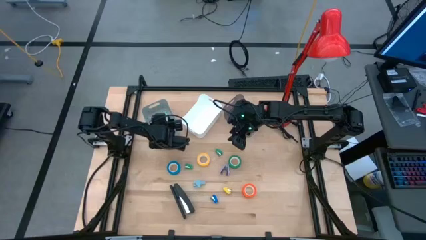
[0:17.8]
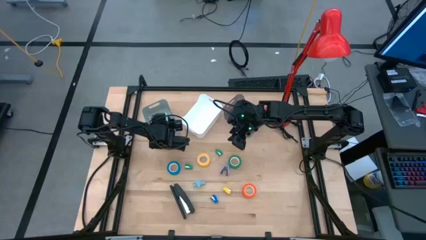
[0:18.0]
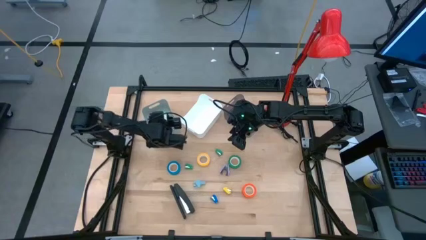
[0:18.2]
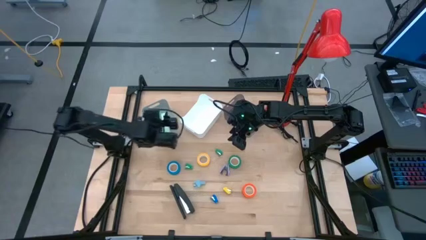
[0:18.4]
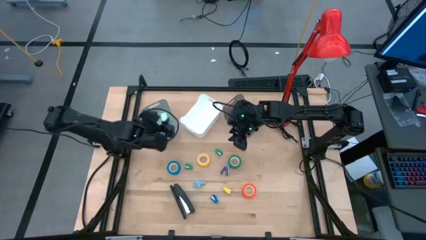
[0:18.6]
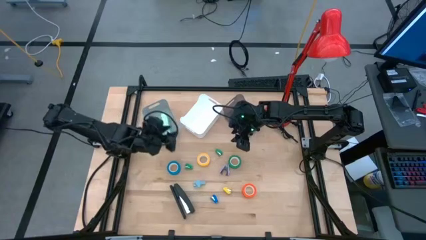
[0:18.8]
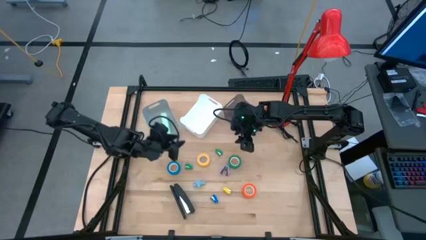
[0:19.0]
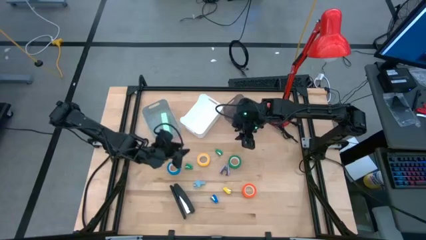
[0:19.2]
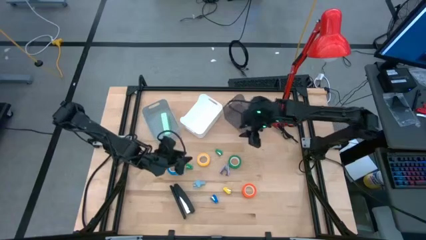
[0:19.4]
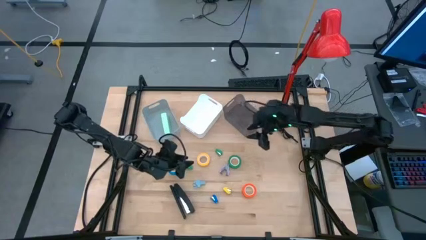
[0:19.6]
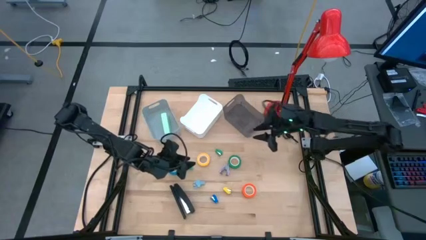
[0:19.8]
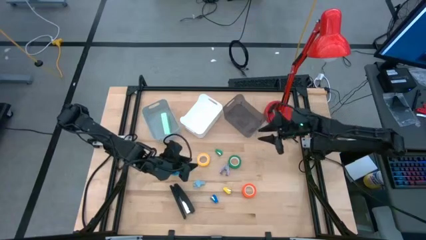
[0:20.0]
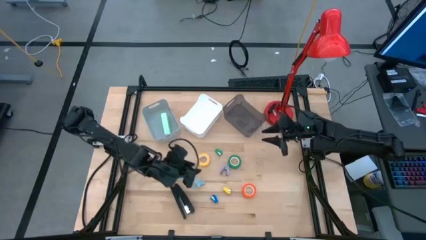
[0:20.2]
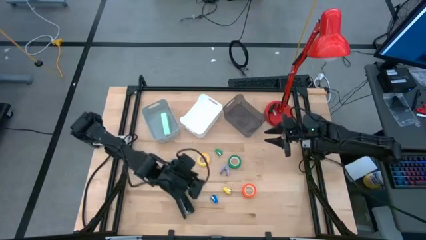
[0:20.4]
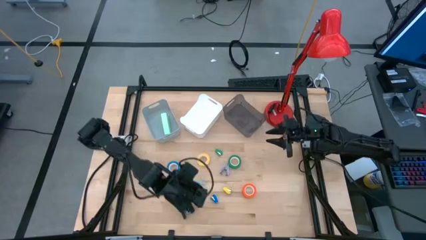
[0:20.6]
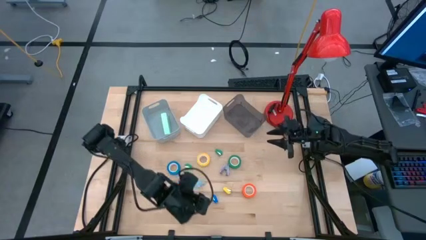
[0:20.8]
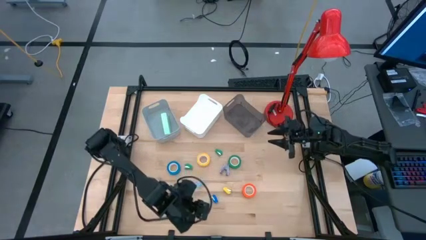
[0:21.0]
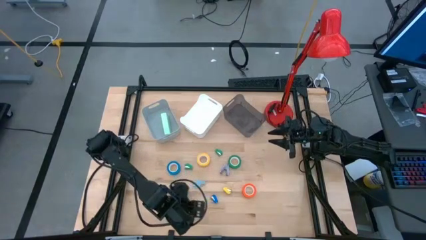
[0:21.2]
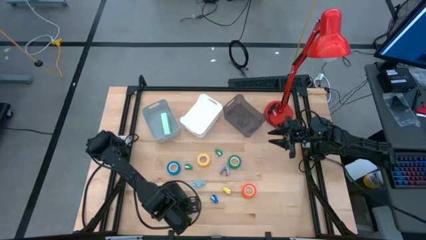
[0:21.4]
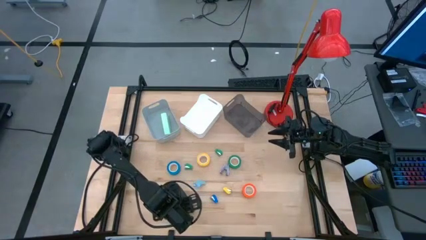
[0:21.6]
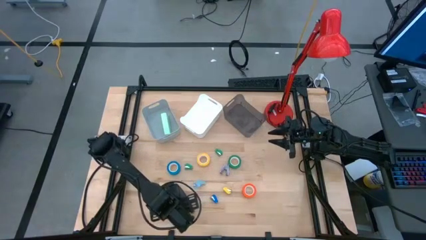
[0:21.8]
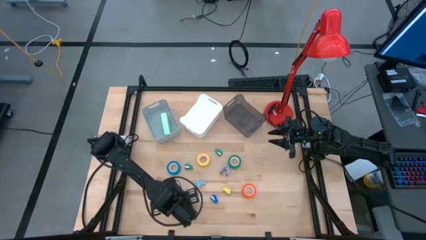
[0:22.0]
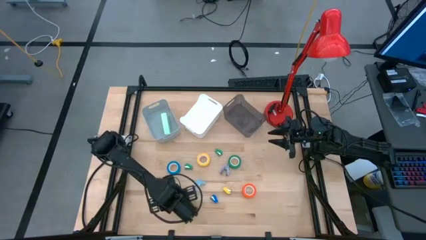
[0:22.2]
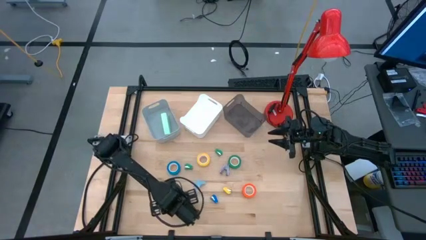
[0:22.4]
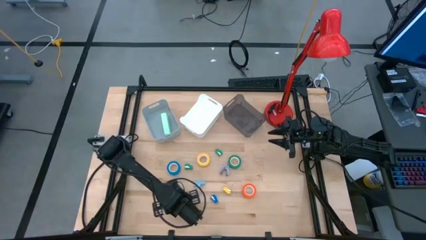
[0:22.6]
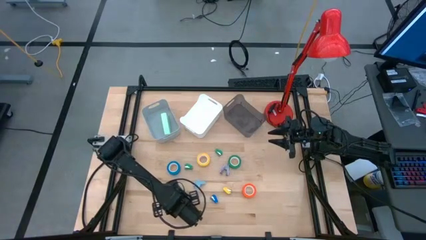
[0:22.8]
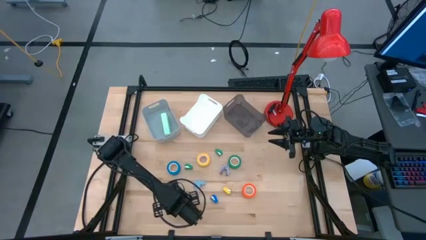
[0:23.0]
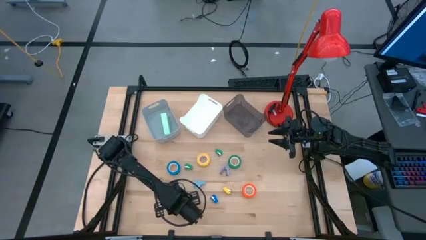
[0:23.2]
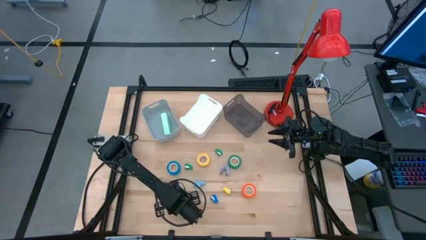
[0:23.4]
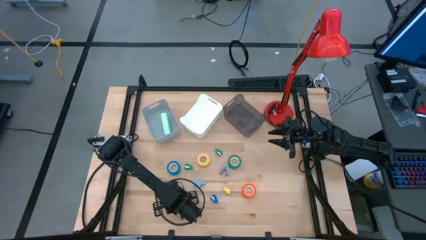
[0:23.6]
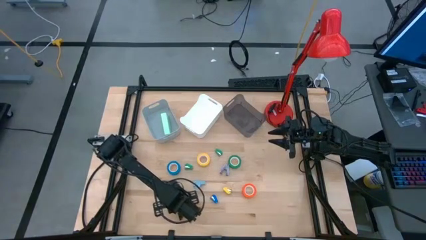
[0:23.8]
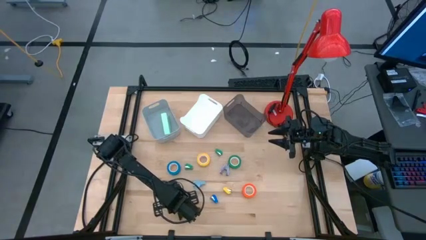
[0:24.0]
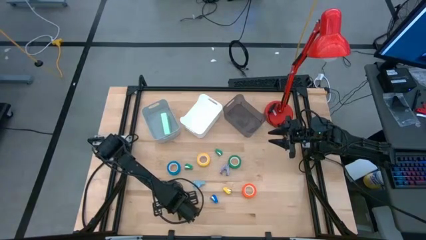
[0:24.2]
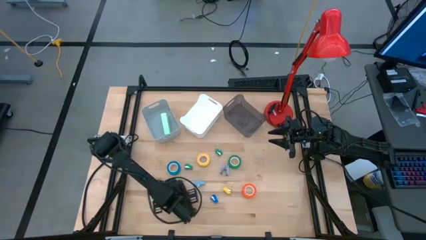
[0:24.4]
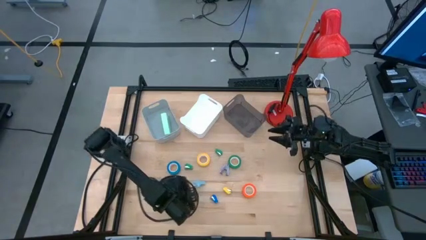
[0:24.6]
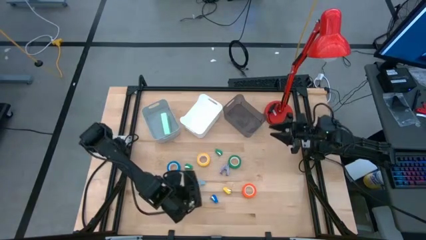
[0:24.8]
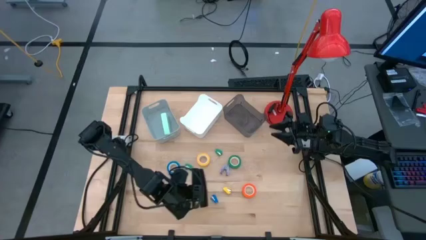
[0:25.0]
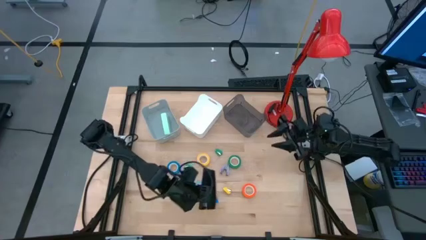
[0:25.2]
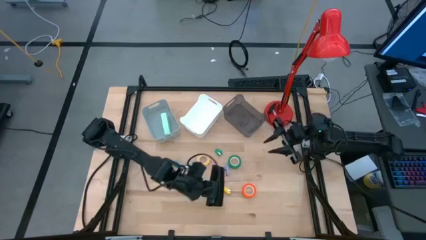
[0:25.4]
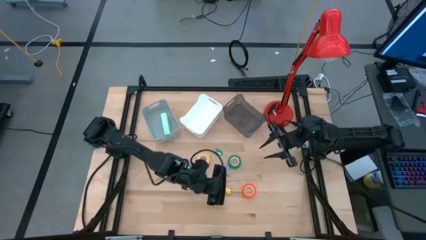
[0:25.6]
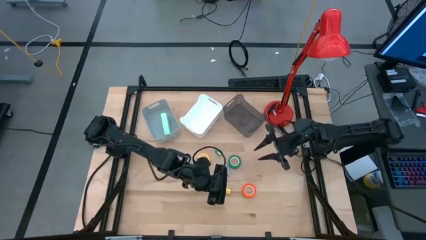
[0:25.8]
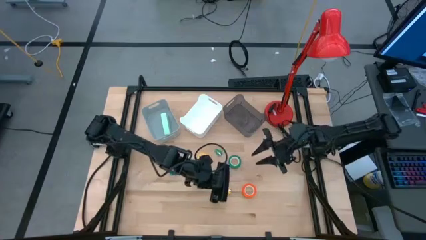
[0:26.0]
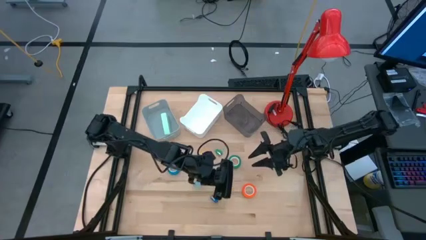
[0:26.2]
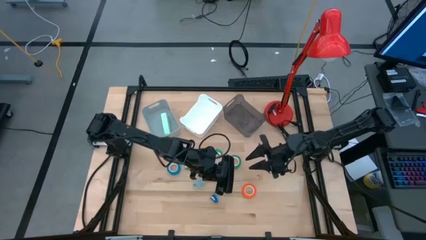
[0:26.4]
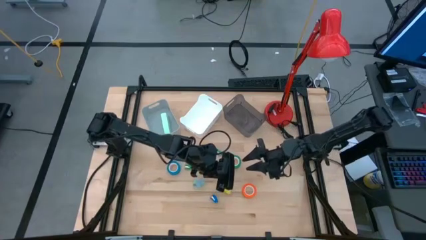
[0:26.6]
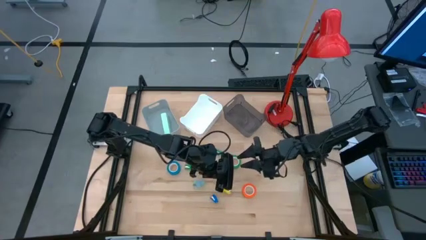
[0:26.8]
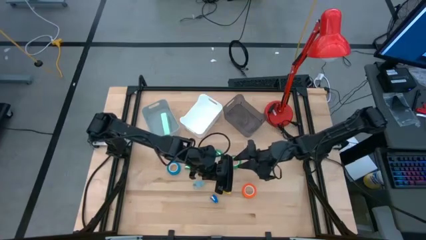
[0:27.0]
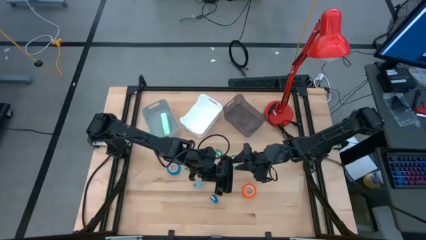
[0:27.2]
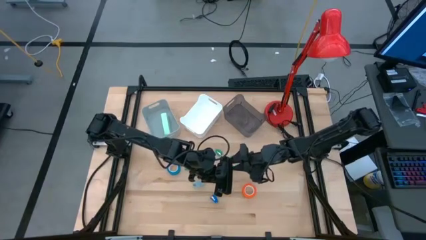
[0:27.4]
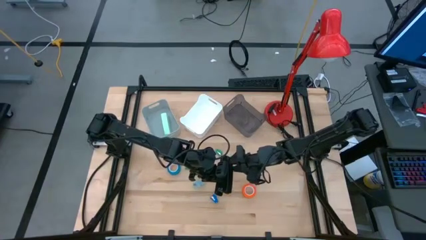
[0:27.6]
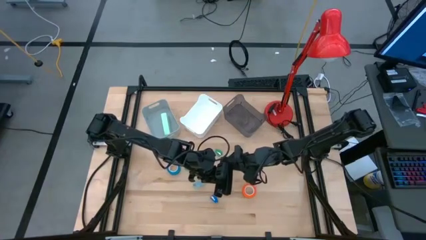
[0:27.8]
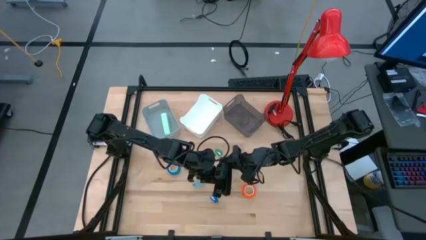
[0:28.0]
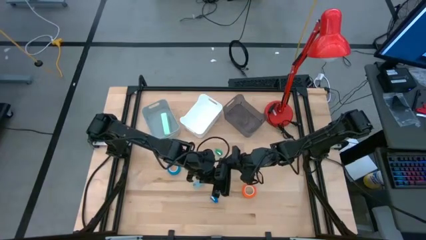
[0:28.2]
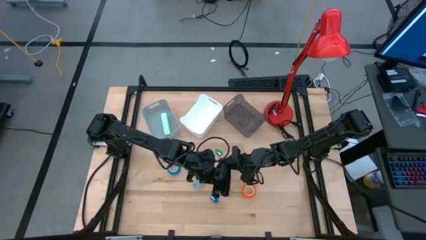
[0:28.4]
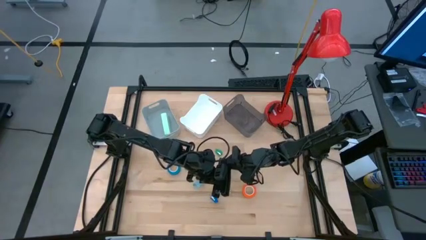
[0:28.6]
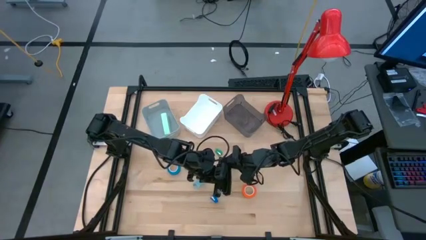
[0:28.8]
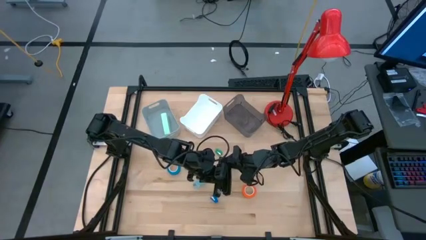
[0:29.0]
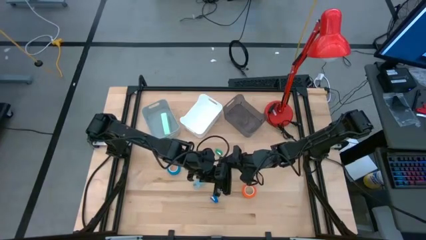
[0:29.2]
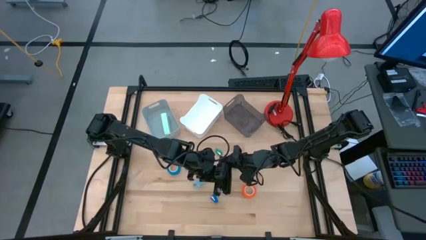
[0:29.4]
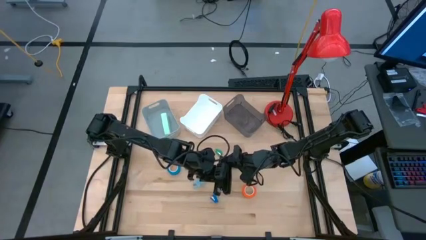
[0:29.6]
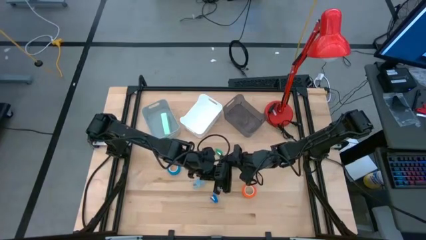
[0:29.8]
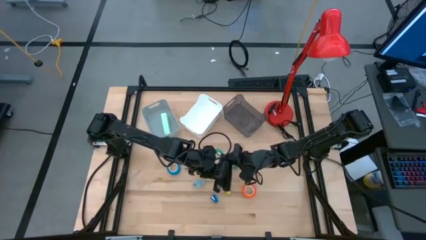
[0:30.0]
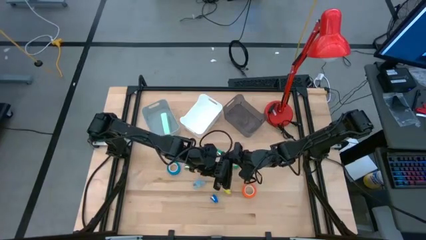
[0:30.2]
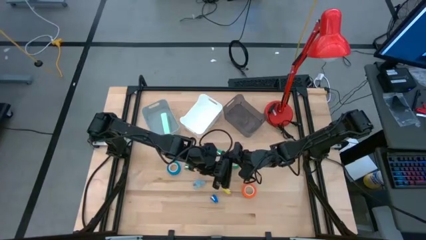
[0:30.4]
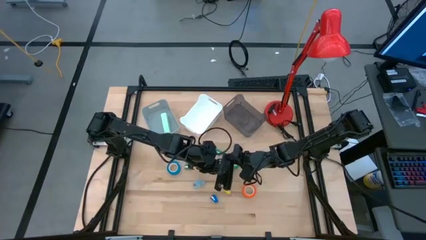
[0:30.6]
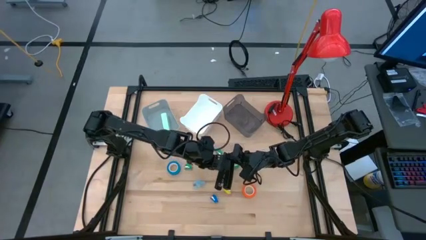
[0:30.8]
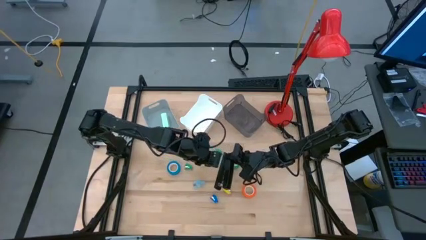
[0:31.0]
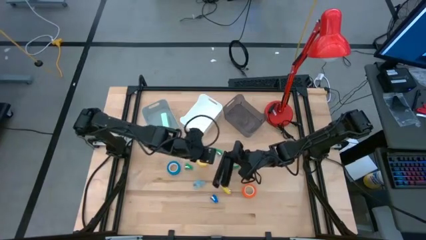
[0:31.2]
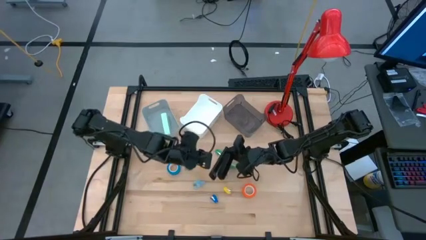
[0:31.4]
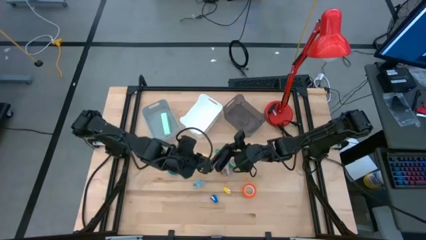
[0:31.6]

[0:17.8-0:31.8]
Task: Pick and place Stapler, Stapler remover, tape
Put the large black stapler into the gray bin
